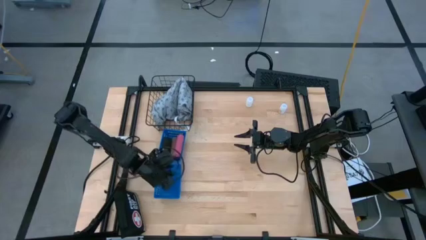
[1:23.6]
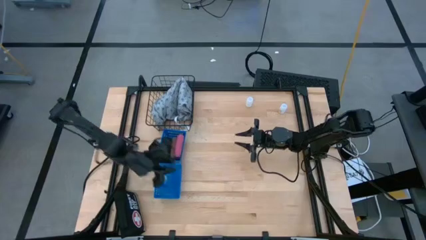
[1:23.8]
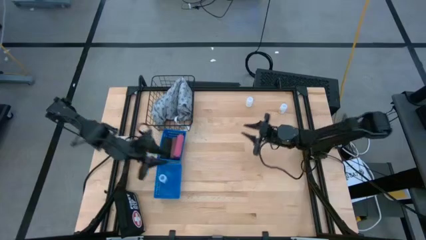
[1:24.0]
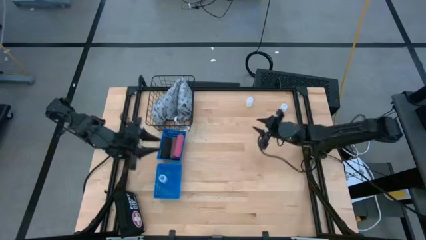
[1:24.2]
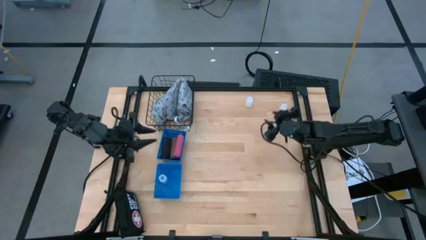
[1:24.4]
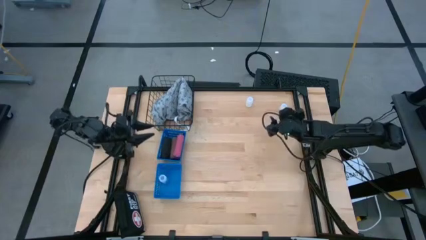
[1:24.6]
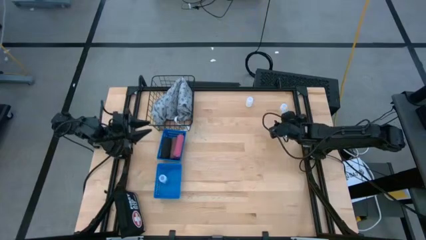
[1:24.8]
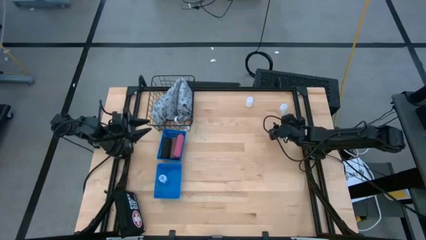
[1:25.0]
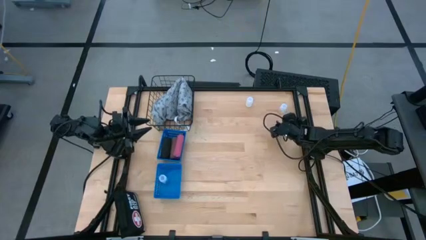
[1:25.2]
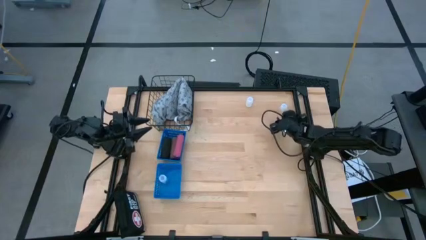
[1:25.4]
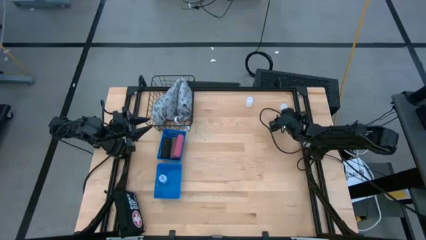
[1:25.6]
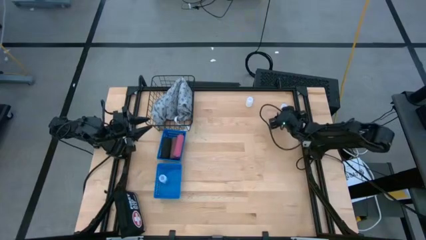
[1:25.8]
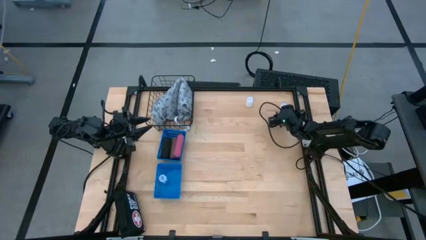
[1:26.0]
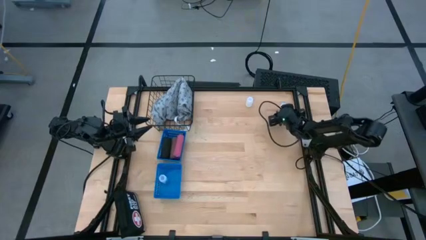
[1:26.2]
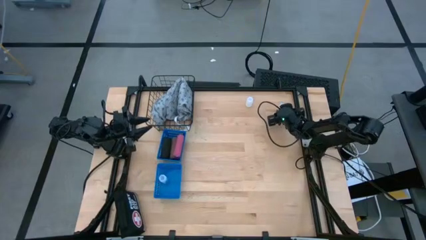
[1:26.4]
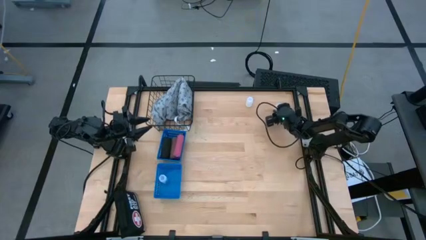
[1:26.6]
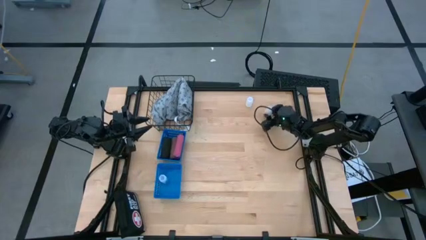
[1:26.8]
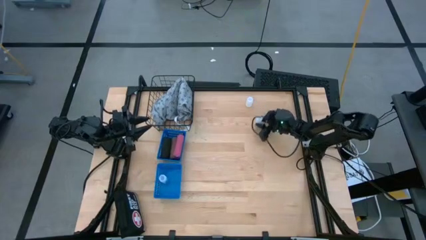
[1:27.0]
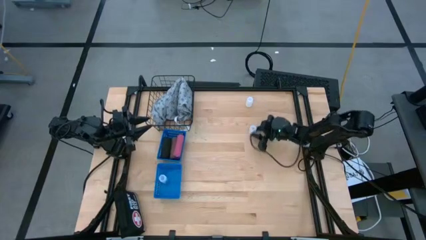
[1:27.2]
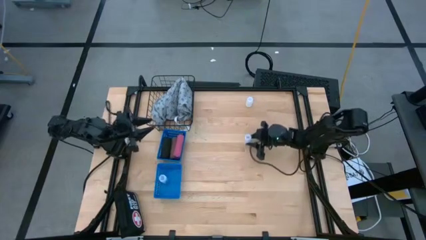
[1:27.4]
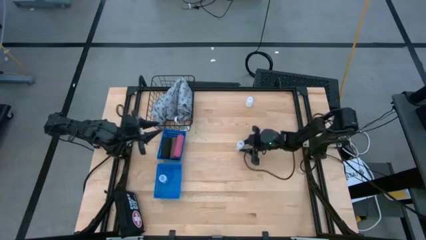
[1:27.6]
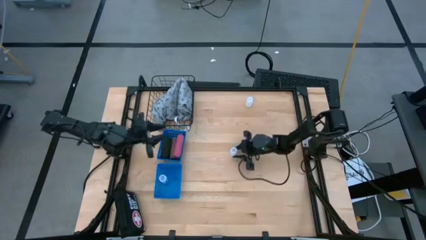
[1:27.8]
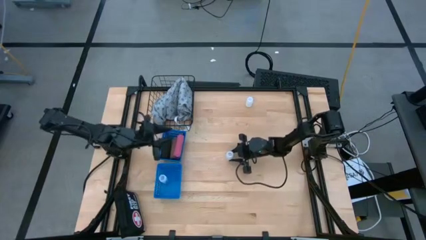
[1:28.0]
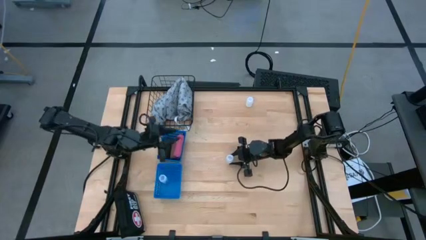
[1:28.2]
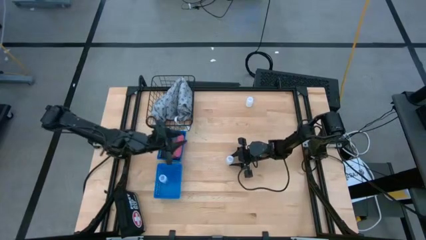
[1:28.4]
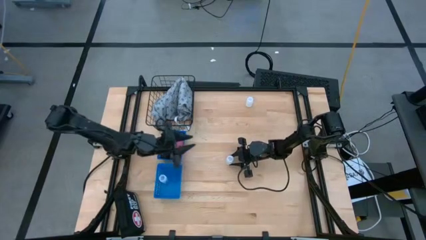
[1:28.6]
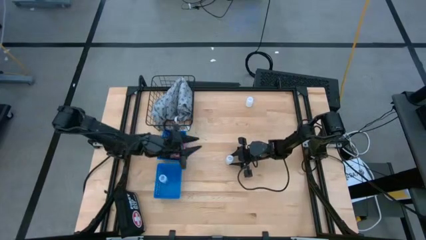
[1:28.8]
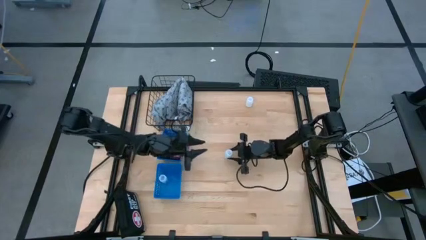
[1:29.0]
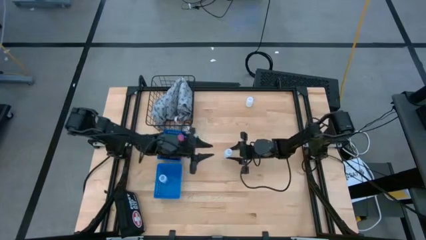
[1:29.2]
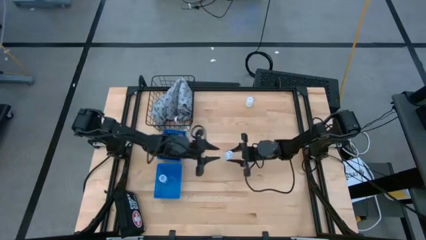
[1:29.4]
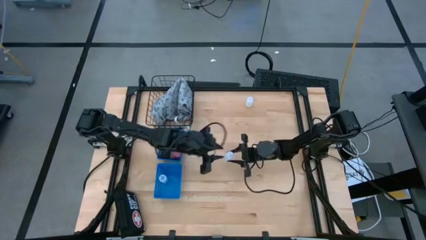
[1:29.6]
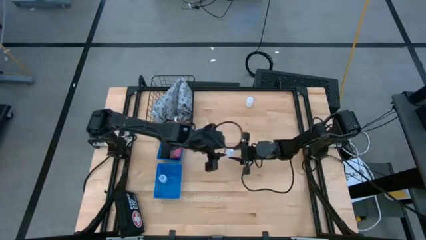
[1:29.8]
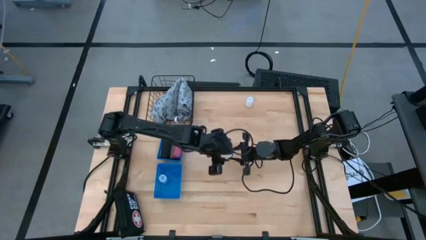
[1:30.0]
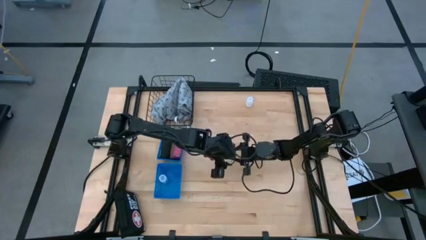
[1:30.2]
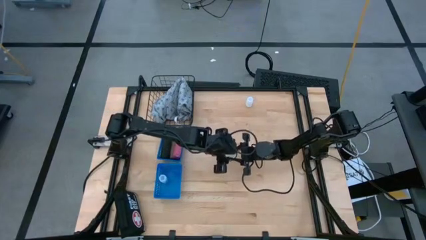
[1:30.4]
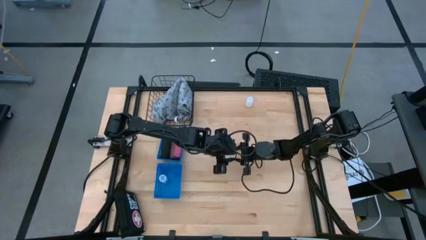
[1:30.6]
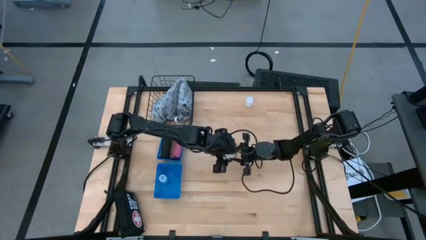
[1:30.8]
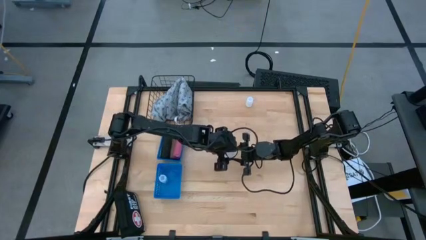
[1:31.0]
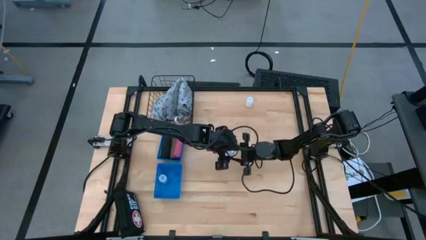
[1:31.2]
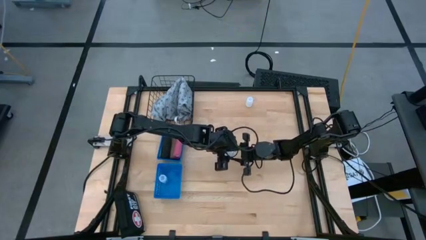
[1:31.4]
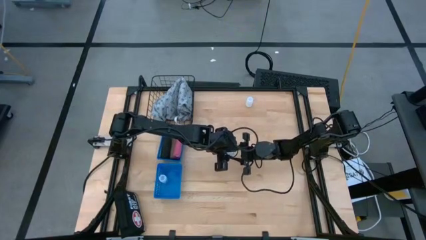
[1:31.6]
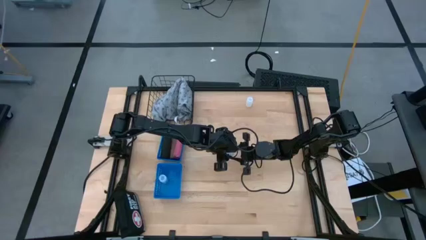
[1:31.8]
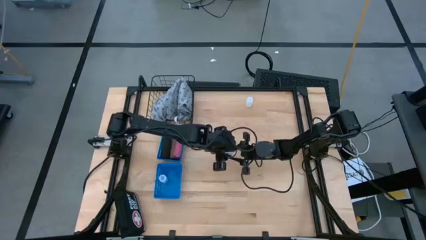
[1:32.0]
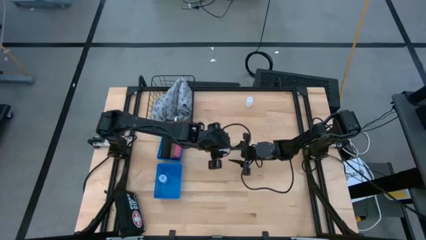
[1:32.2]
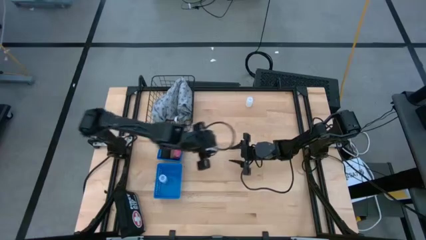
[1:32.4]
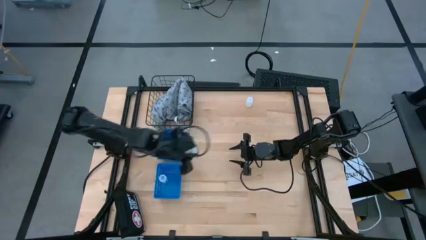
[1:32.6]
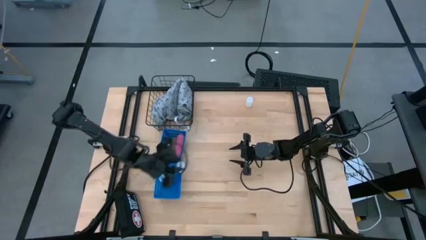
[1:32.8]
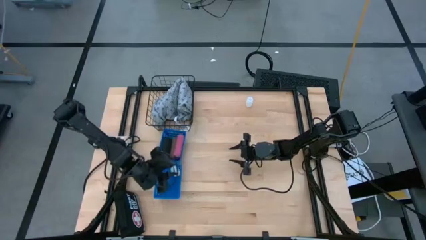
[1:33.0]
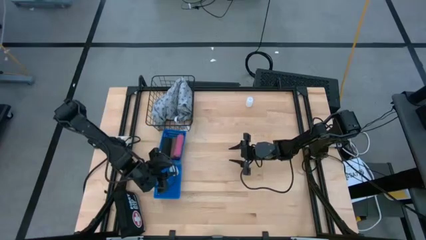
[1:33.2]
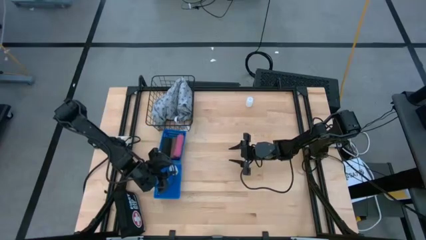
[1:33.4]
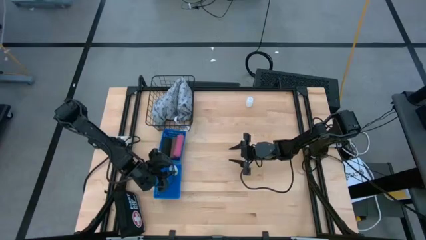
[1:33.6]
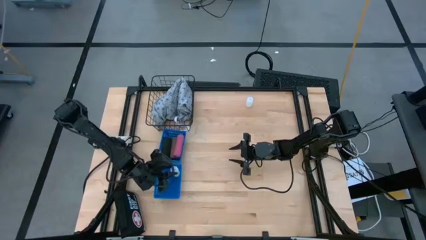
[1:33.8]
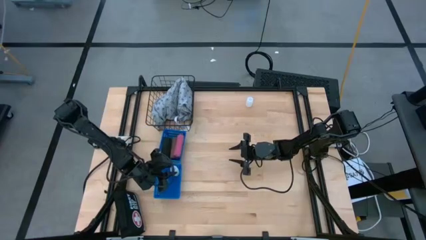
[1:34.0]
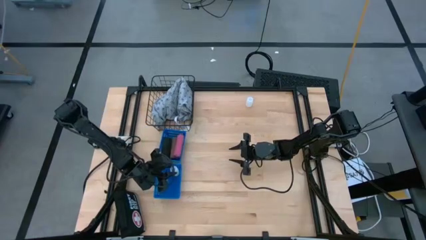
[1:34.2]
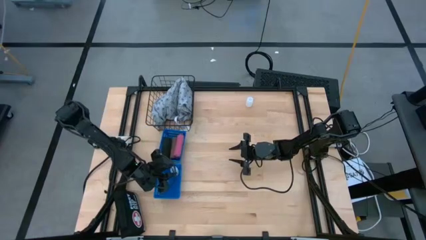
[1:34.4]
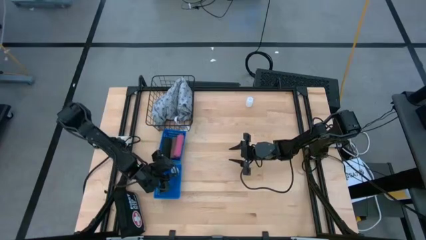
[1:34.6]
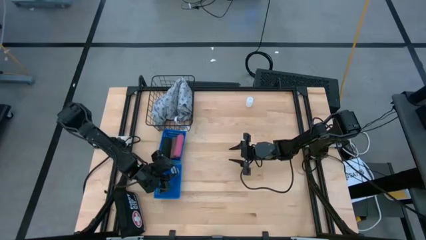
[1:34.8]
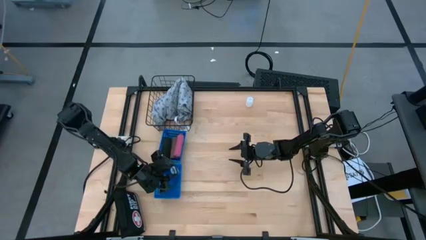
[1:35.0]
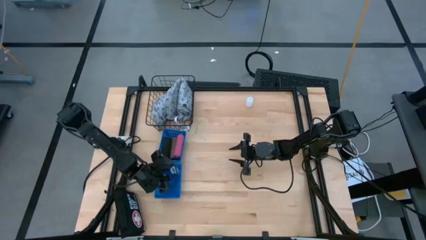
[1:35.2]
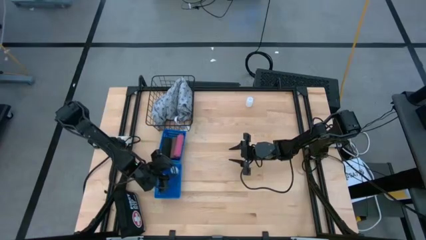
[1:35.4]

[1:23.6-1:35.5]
Task: Pick & Place Medicine items
Put the right transparent bottle into the bottom blue basket
